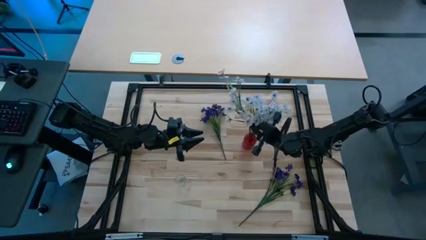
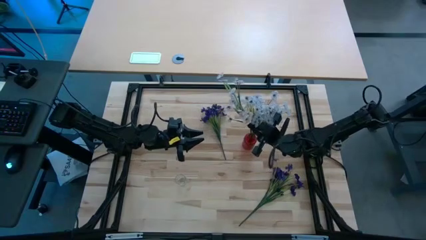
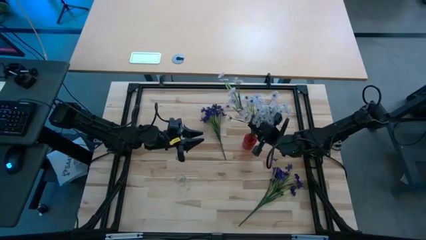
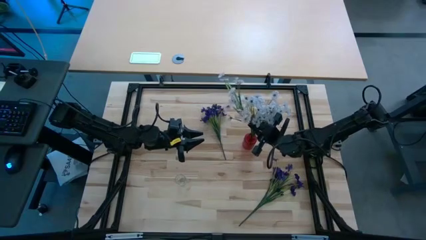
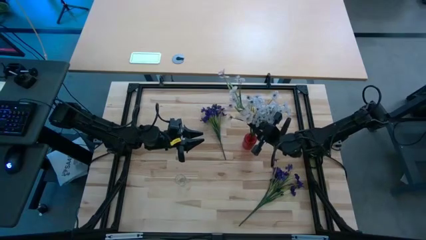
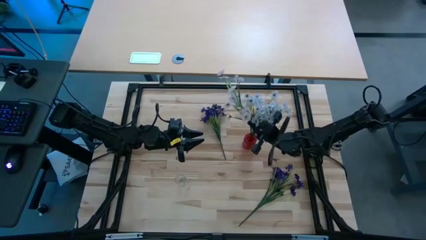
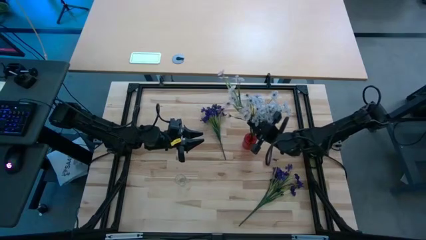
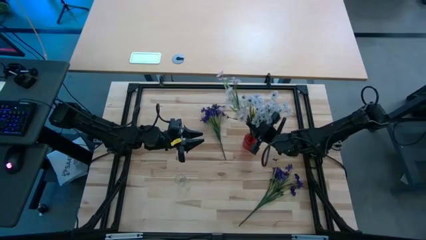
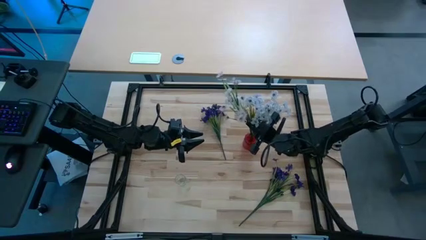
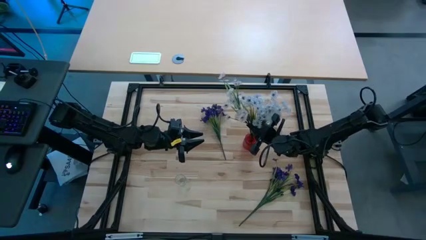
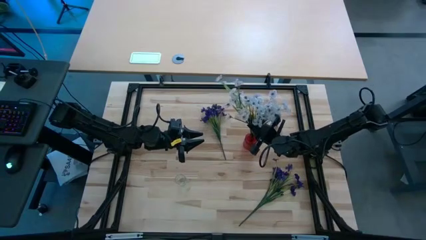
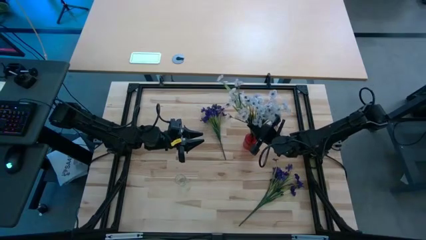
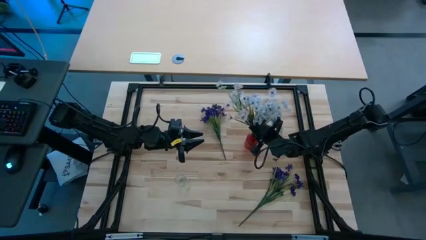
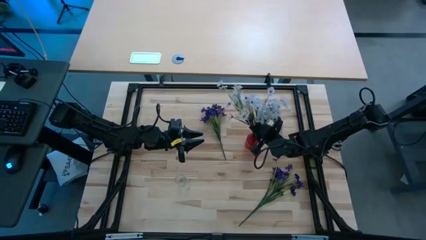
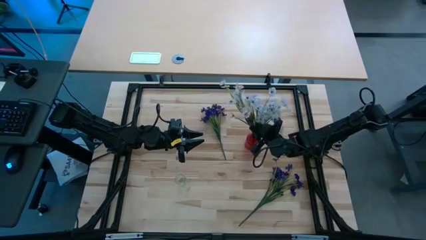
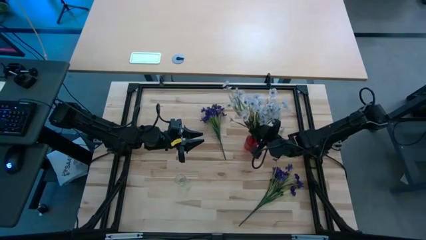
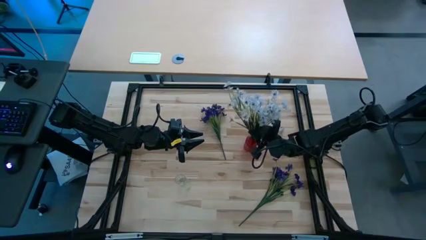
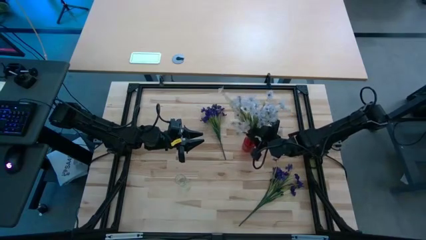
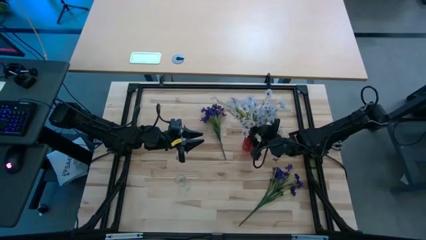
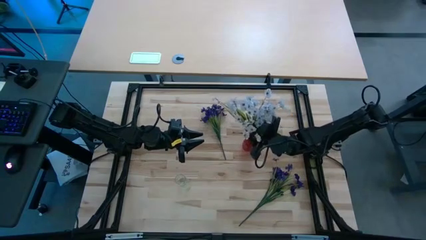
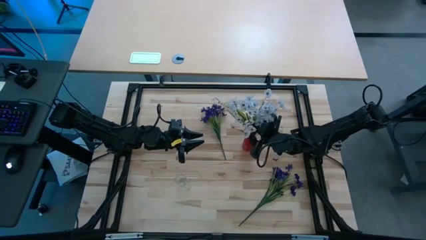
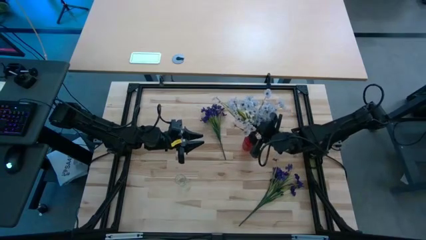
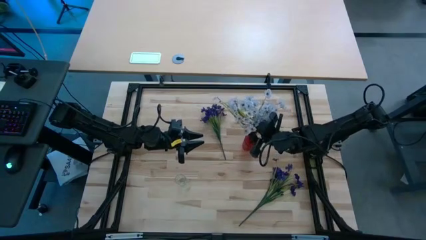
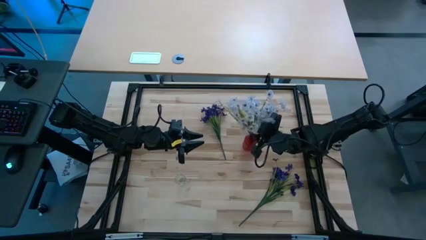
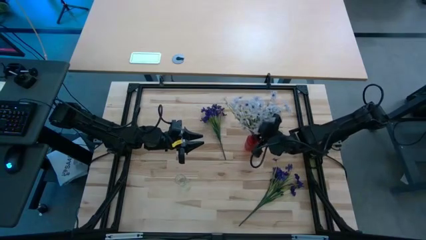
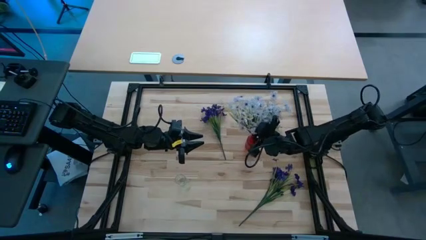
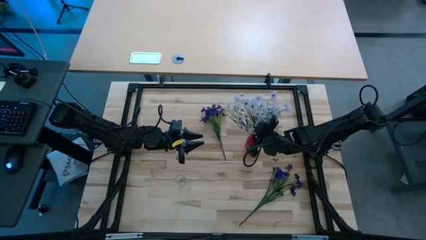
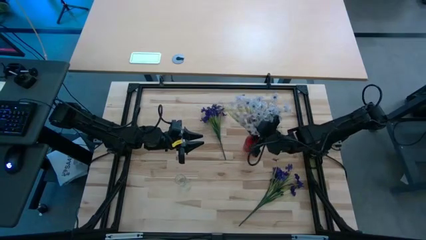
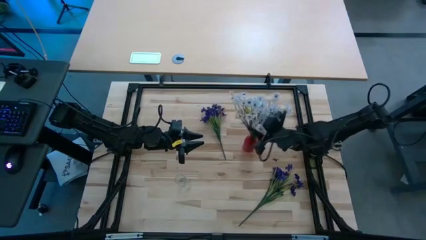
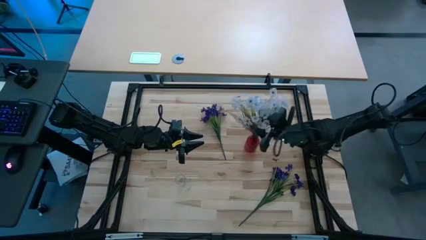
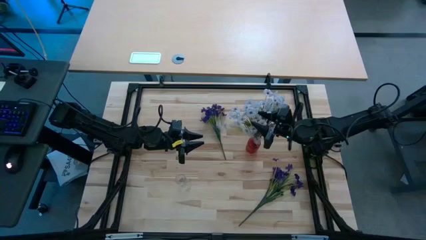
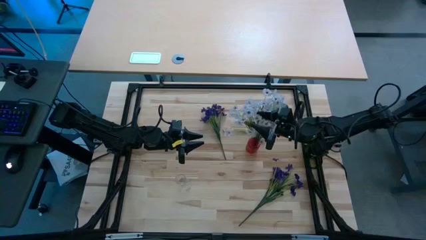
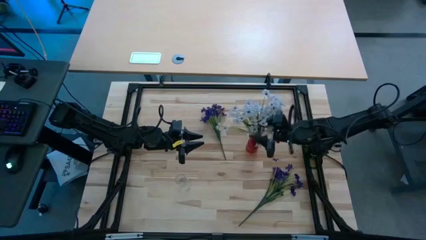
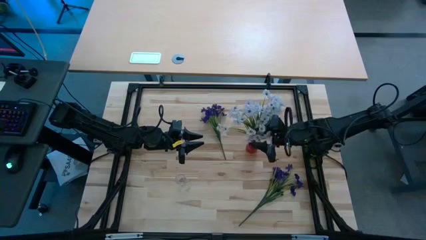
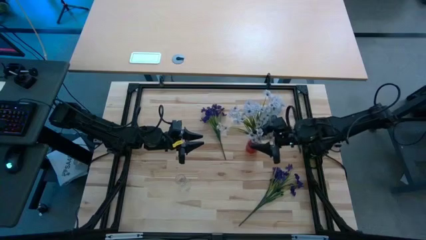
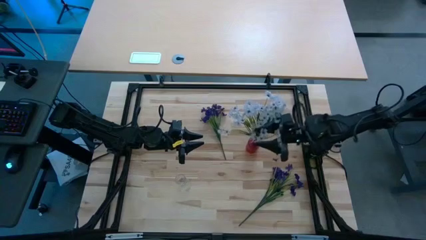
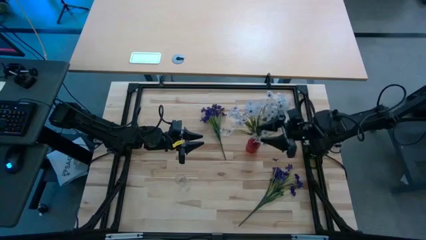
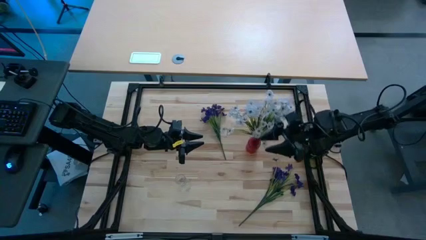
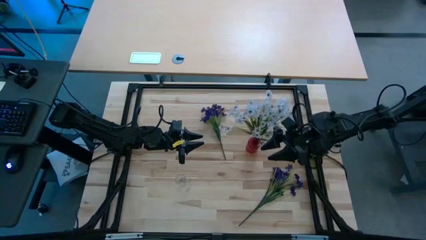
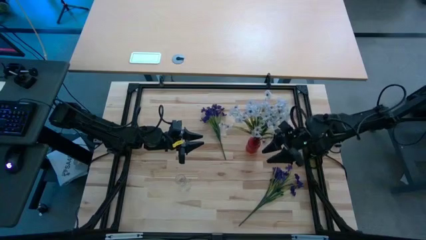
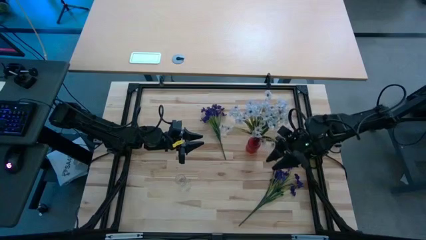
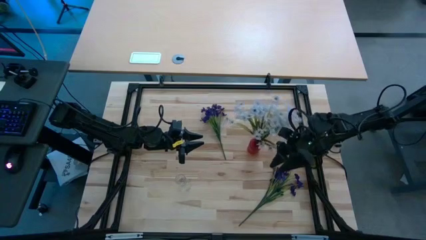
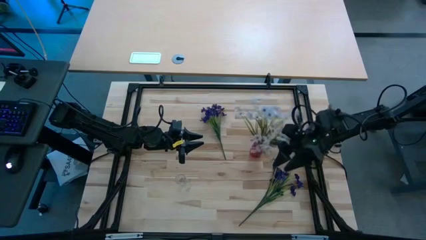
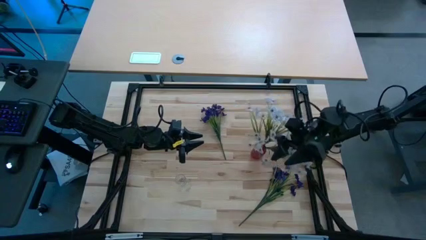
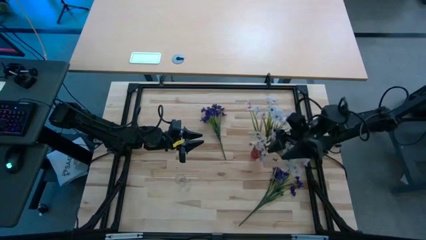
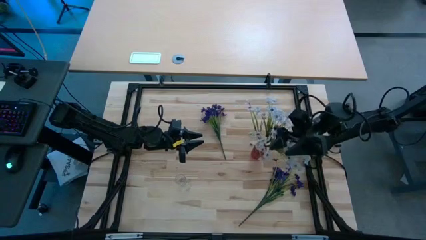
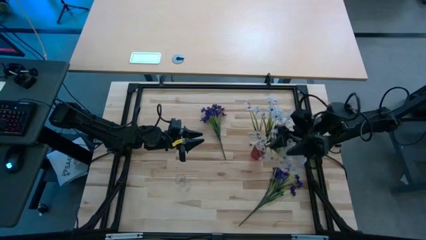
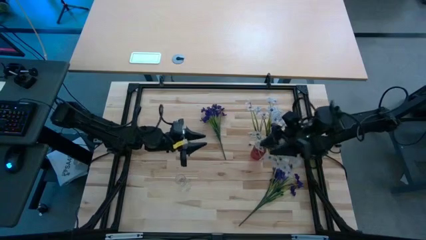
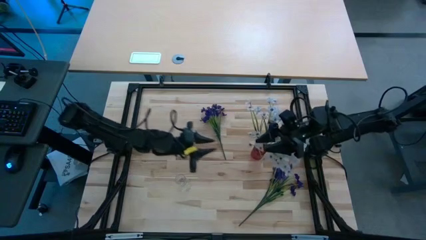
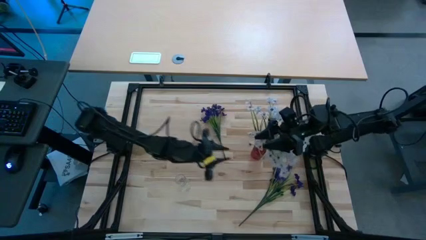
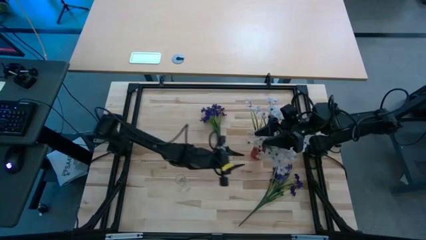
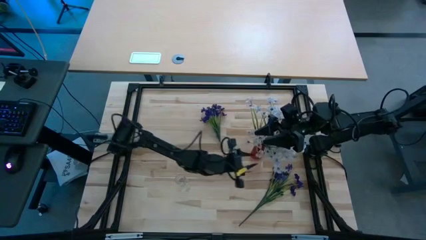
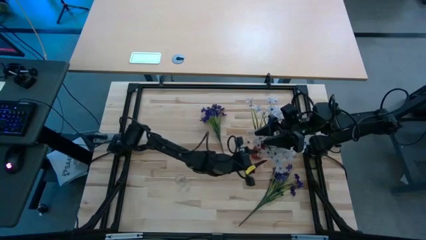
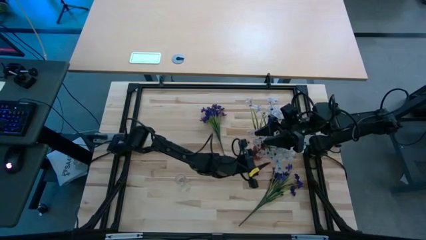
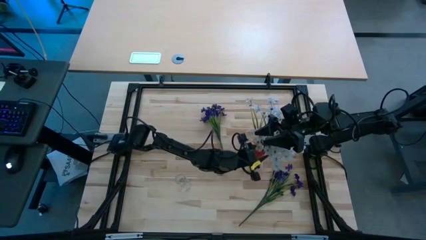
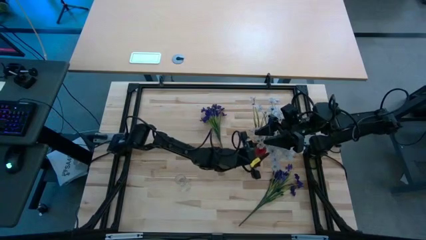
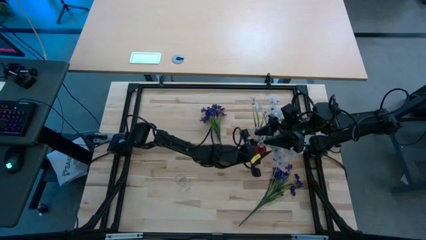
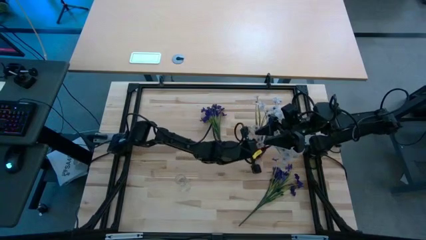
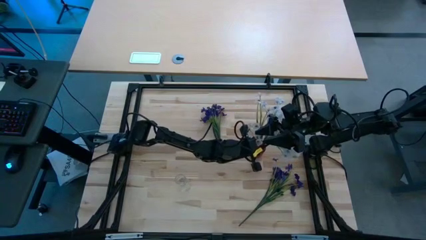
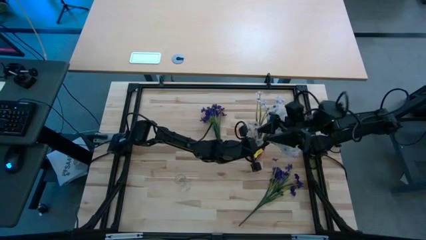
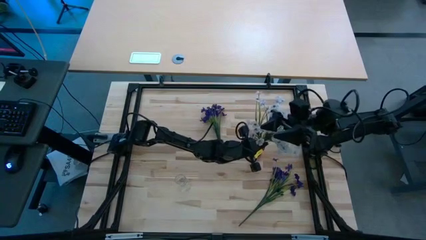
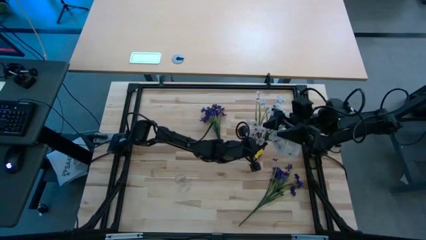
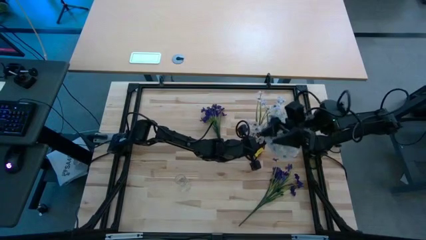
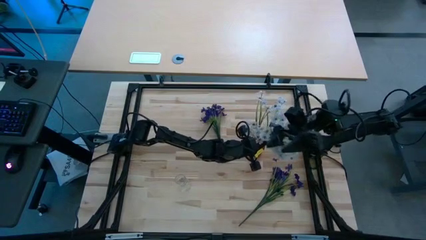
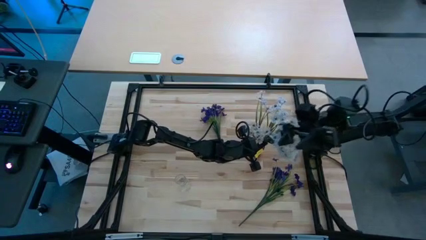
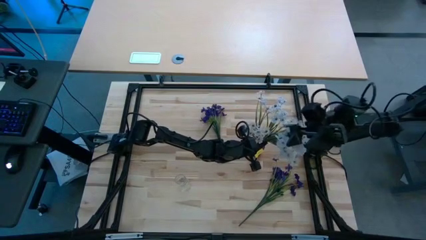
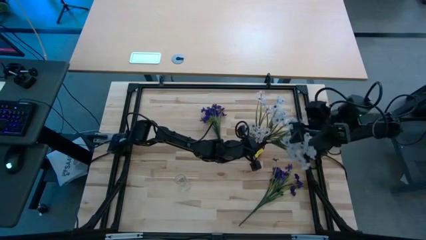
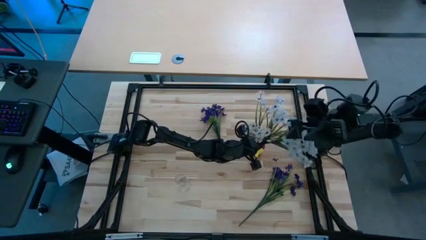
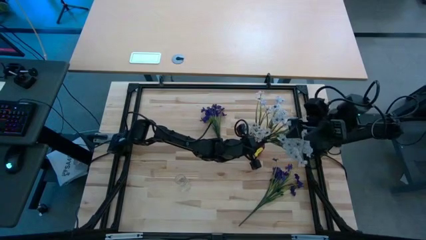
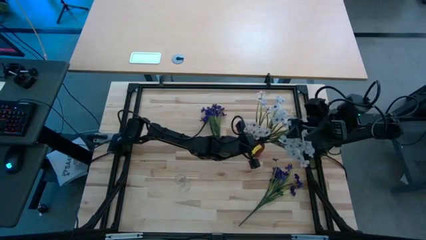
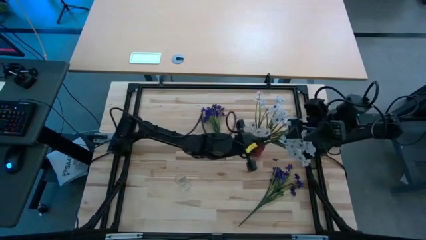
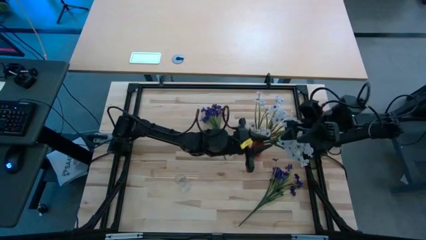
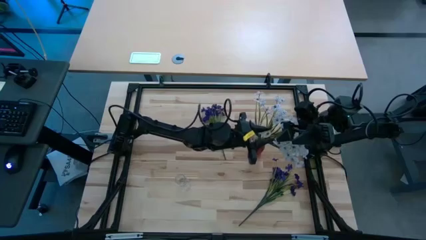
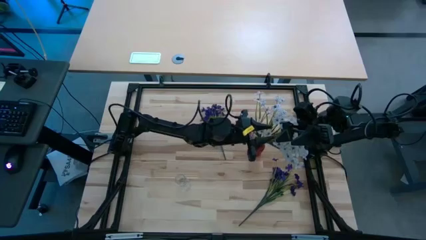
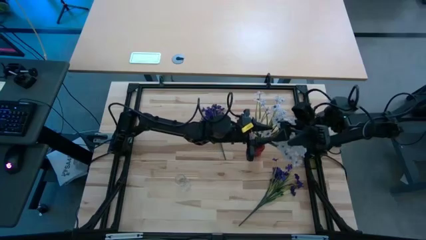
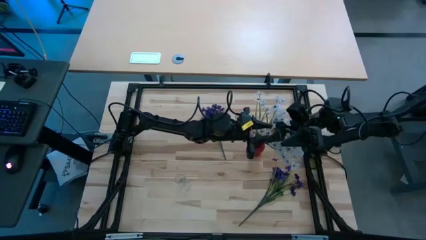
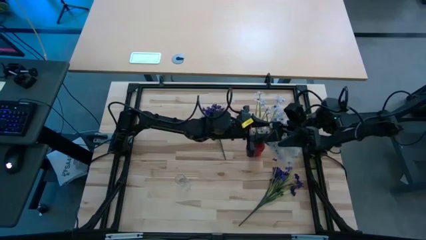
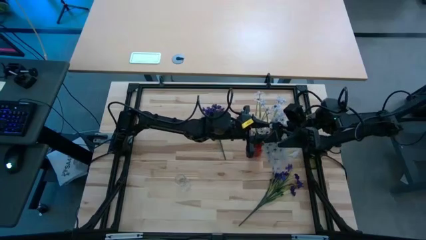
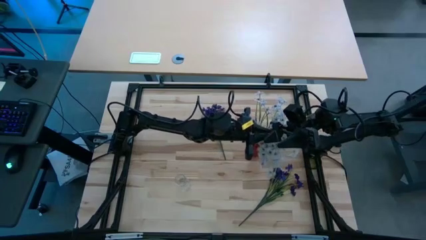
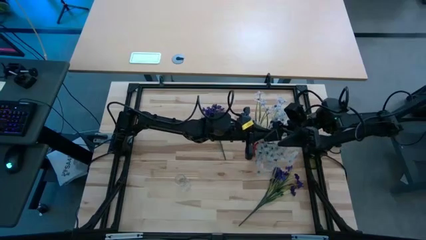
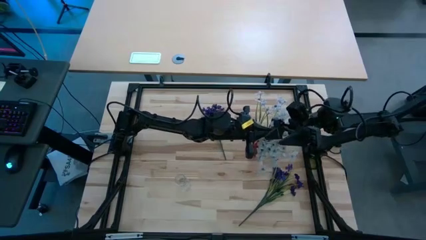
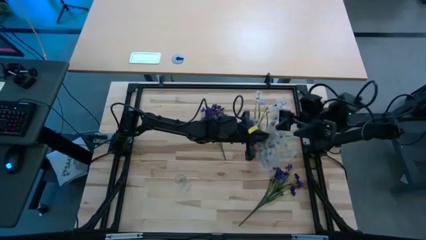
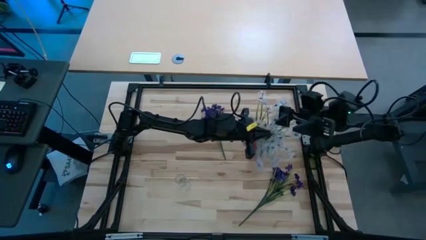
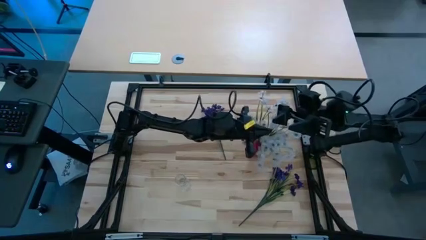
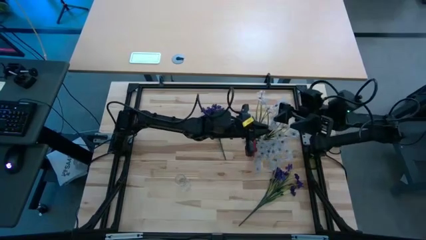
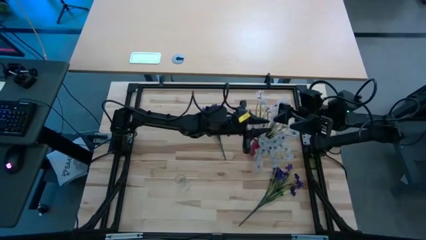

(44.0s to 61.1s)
Task: Sort flowers into vase by color
Put the white flowers into the red vase
